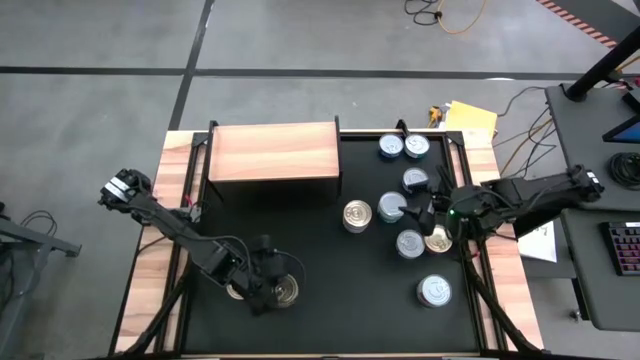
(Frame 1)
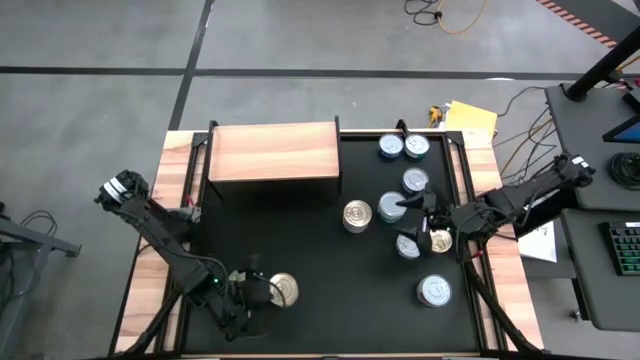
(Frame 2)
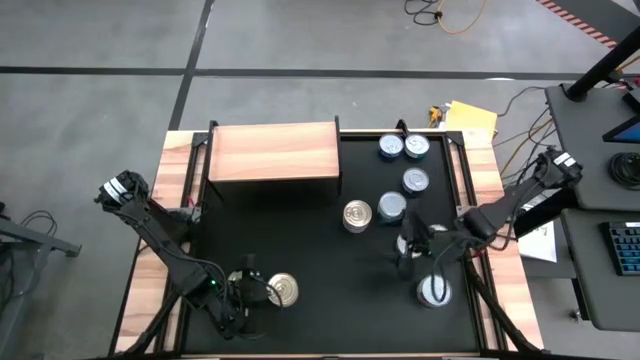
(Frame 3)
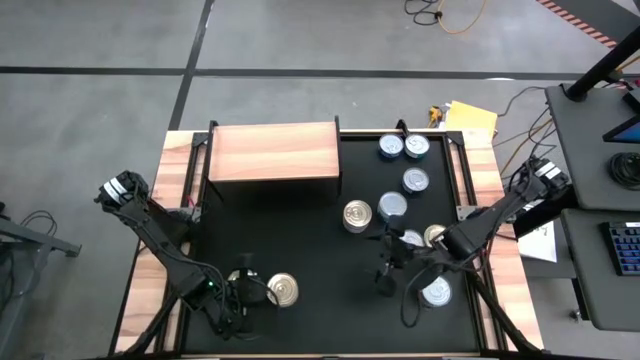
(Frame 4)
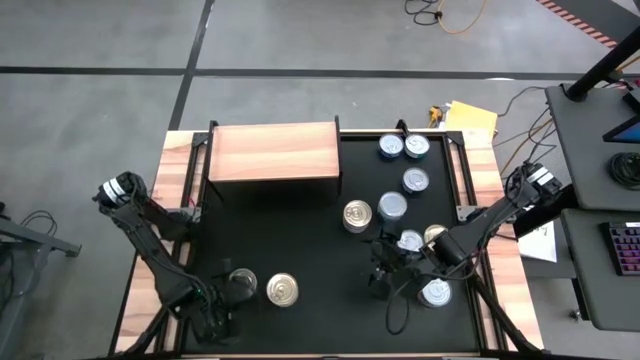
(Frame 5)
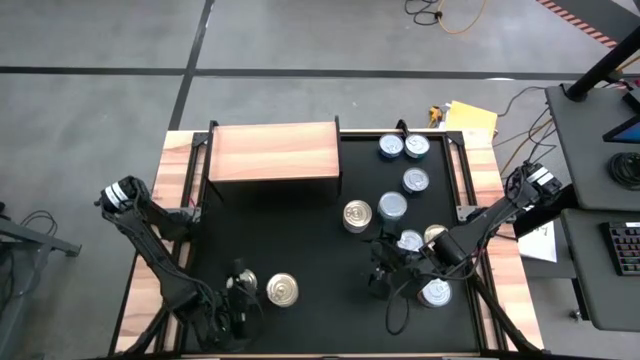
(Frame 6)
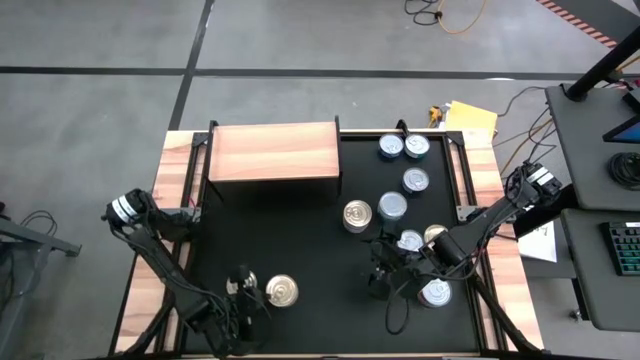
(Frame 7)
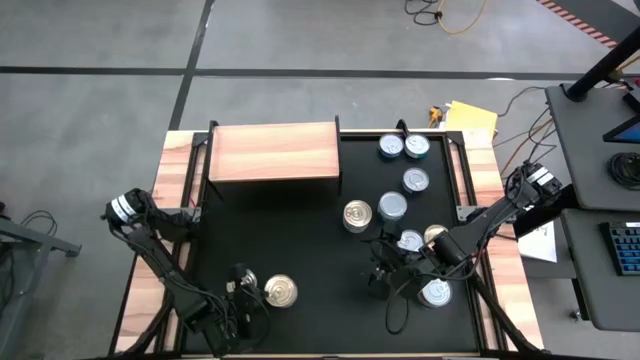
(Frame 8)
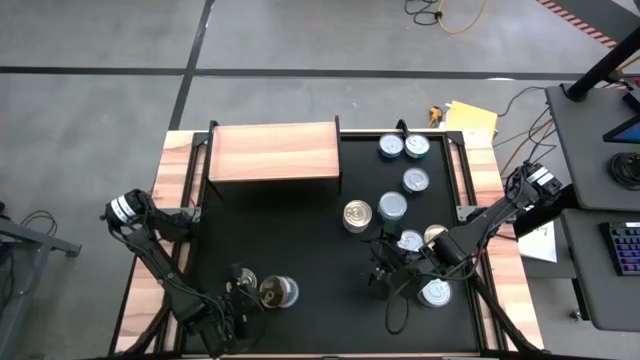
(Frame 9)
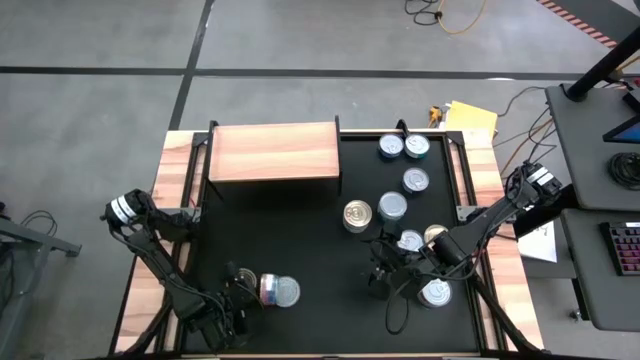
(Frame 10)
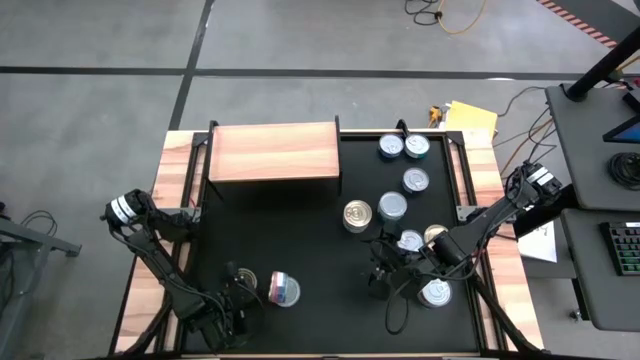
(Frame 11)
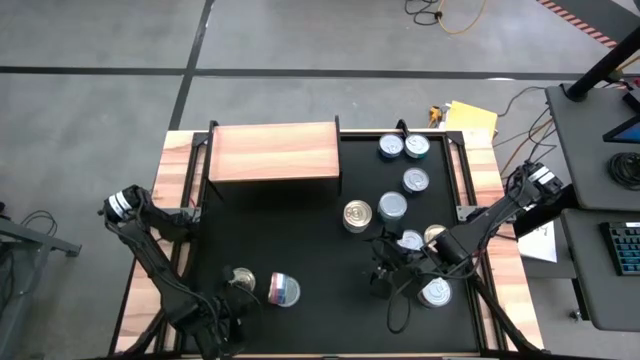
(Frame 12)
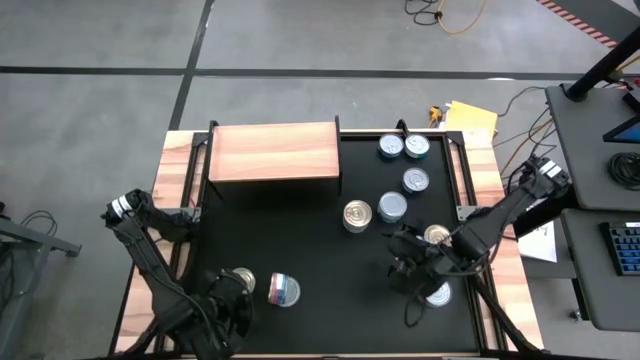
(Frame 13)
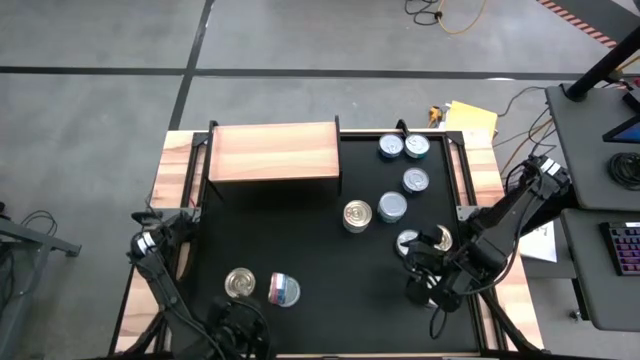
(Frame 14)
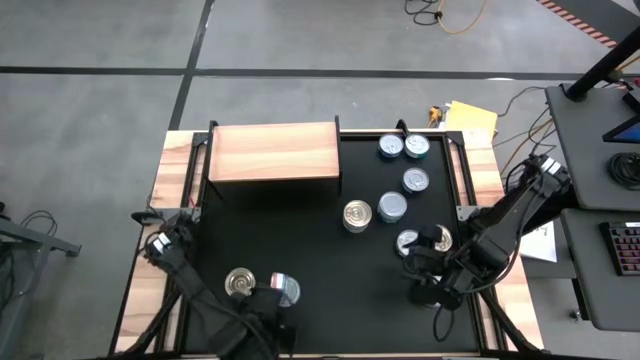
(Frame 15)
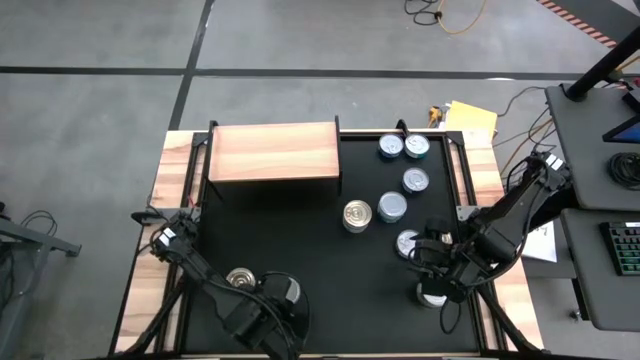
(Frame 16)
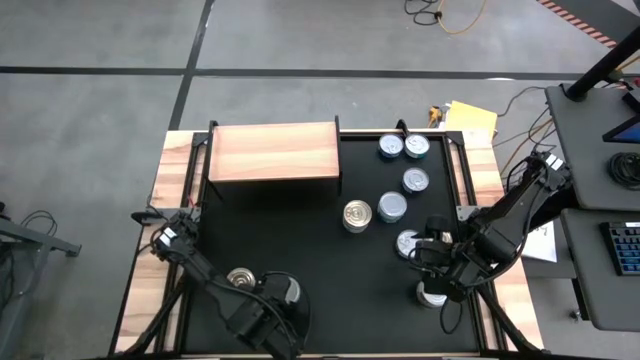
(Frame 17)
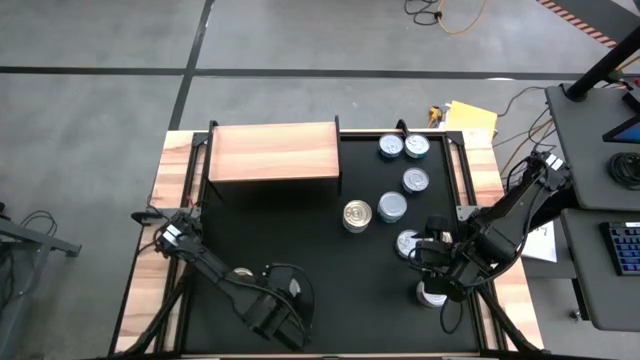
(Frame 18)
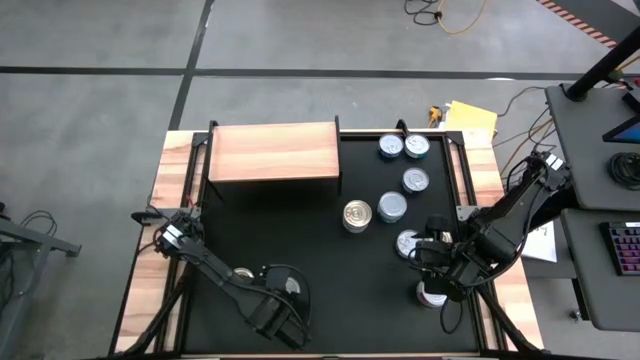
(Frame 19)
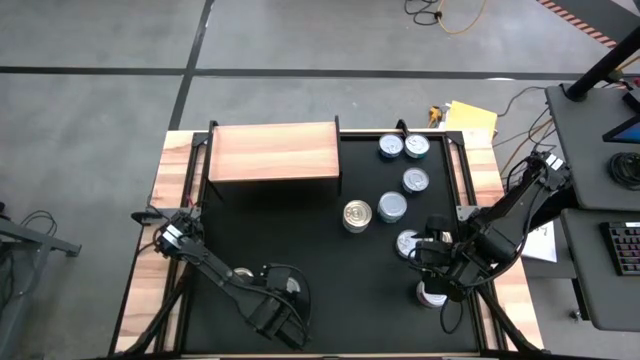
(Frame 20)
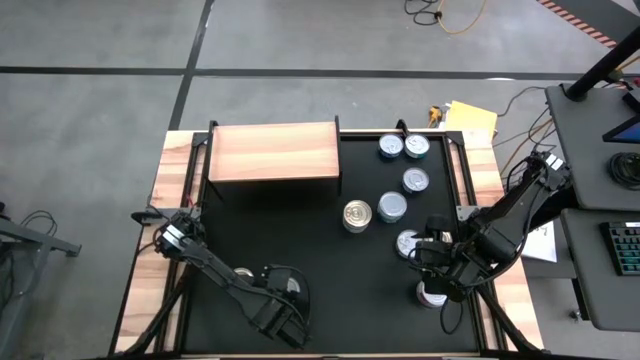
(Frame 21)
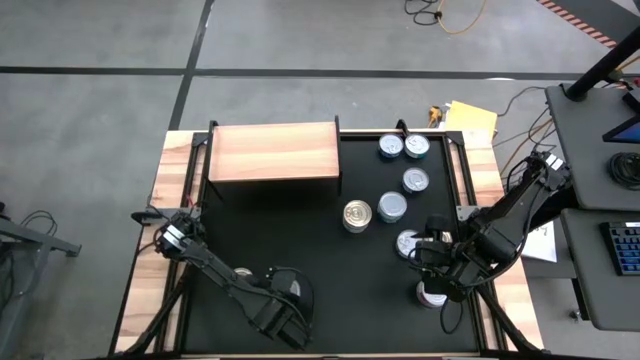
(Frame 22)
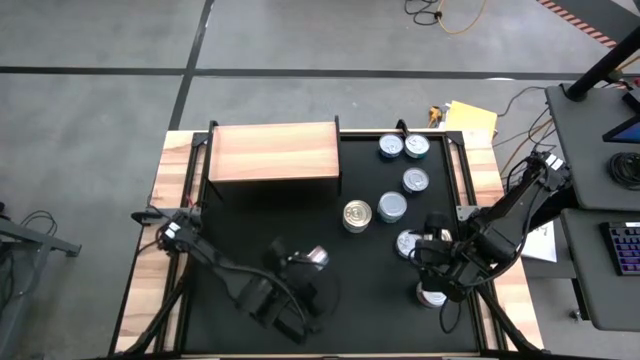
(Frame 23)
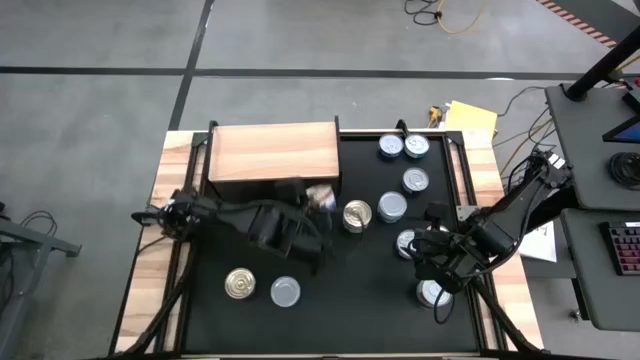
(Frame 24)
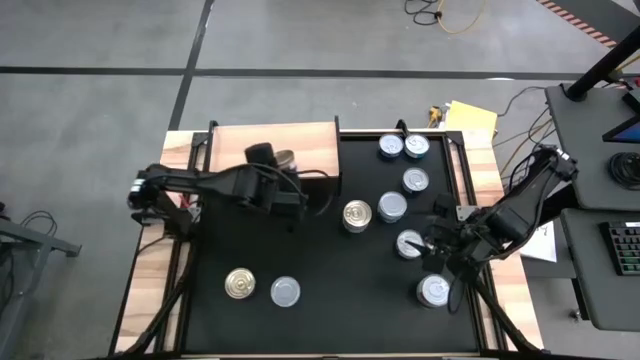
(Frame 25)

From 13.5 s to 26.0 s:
Task: Stack canned seafood by type on shelf
Put the blue/pink tuna can on the shelf

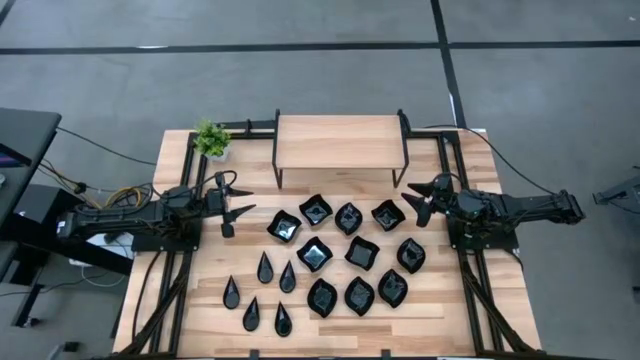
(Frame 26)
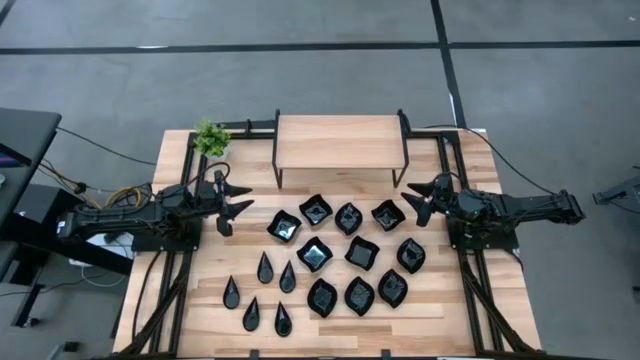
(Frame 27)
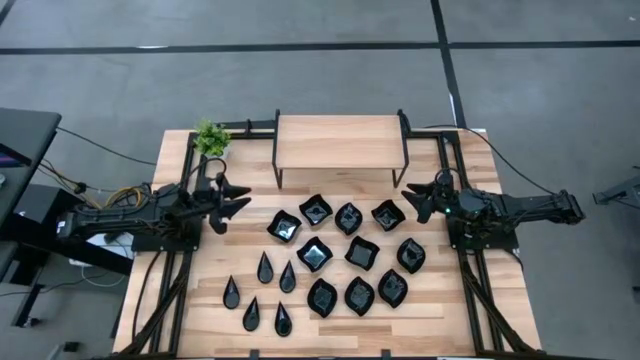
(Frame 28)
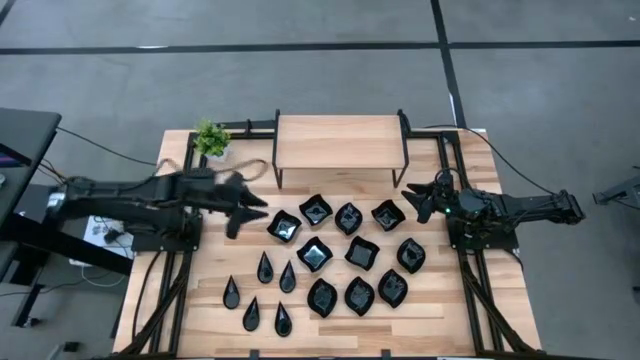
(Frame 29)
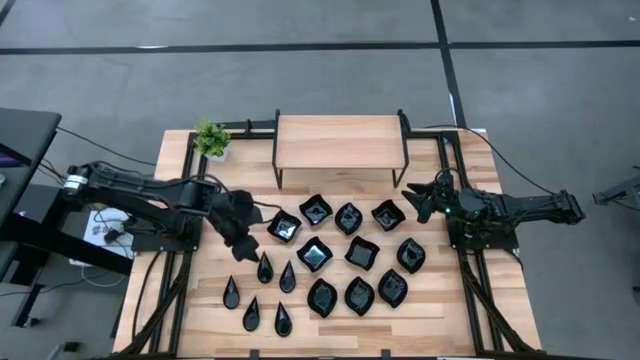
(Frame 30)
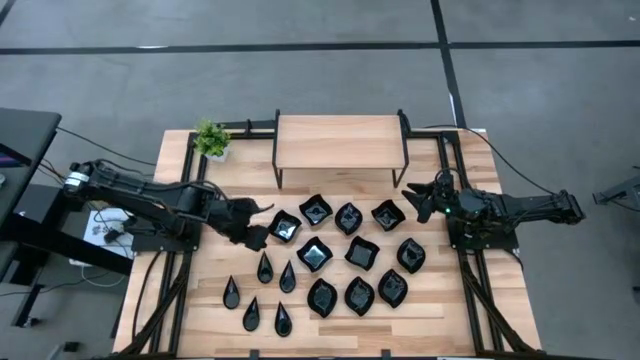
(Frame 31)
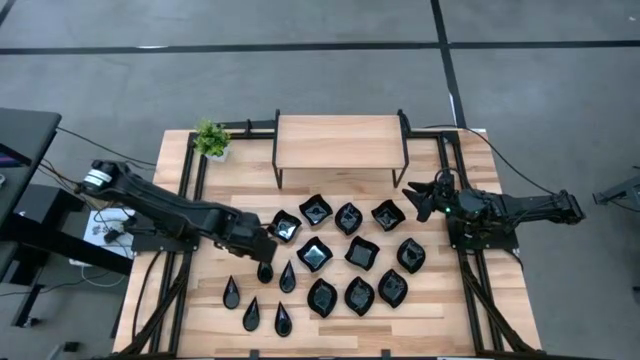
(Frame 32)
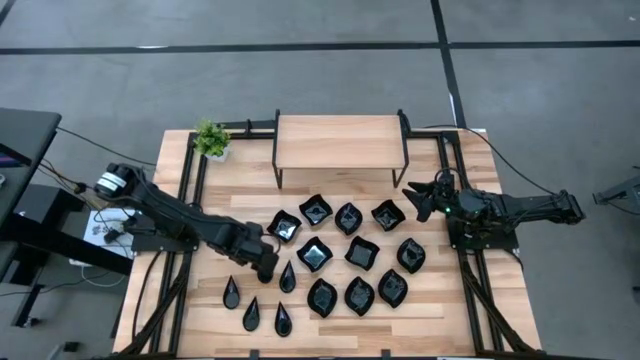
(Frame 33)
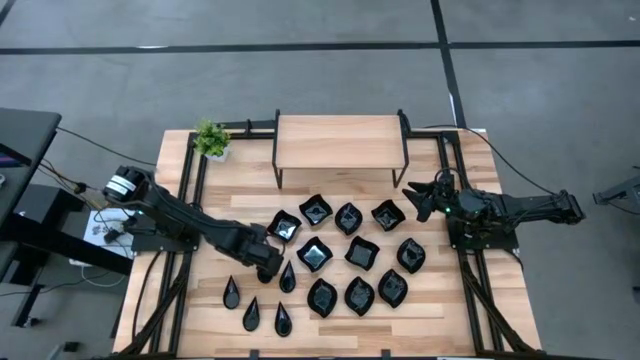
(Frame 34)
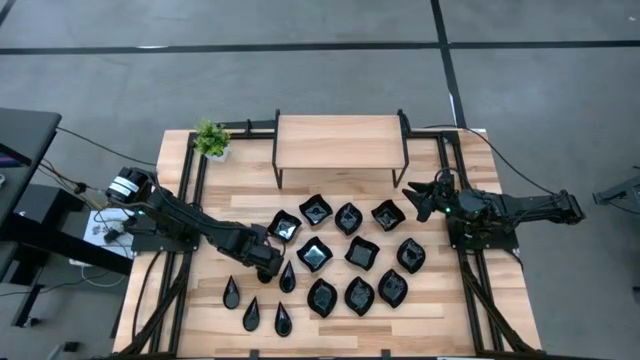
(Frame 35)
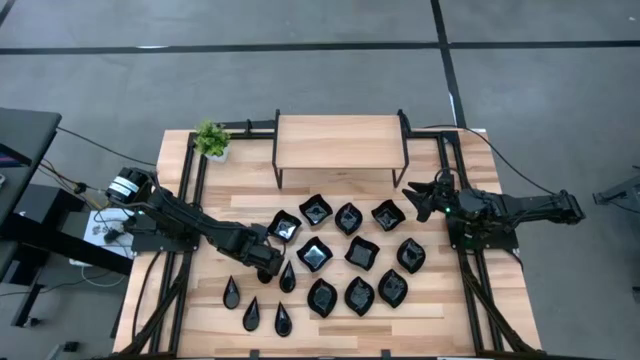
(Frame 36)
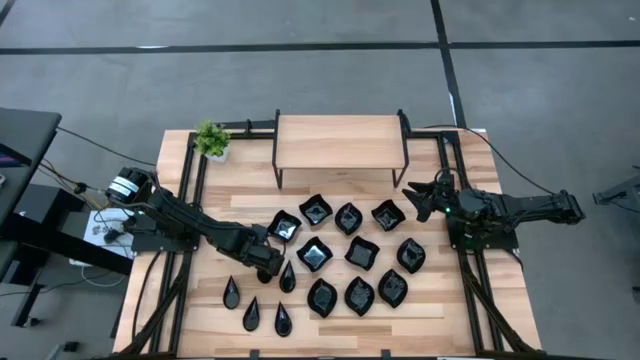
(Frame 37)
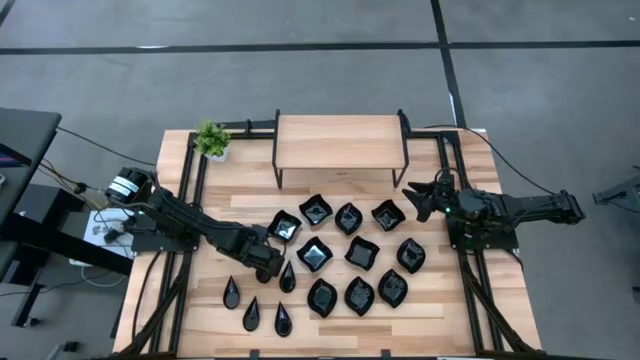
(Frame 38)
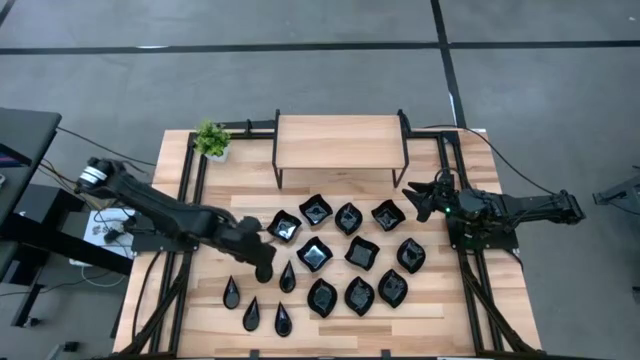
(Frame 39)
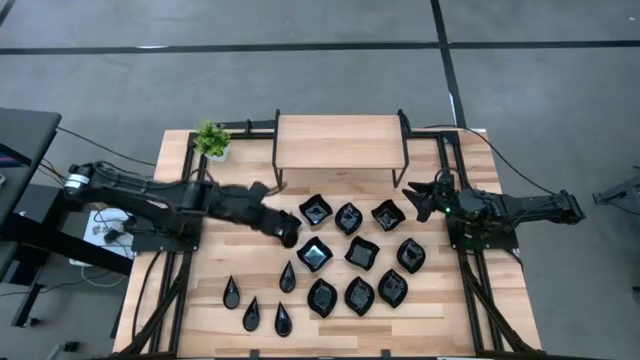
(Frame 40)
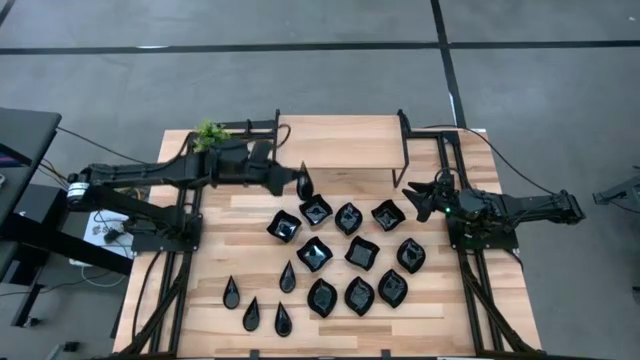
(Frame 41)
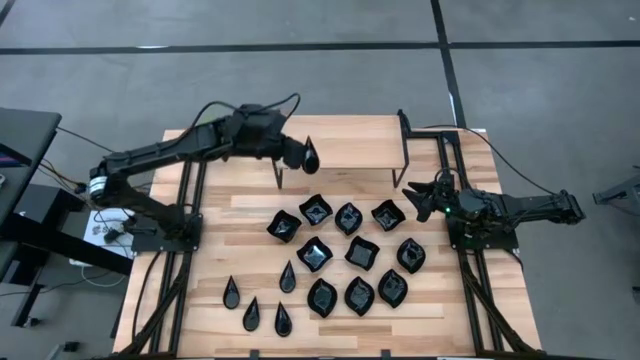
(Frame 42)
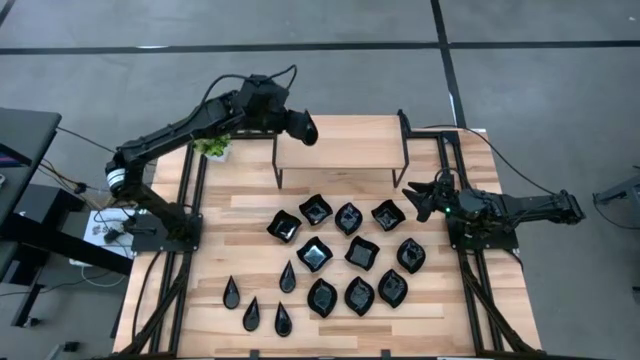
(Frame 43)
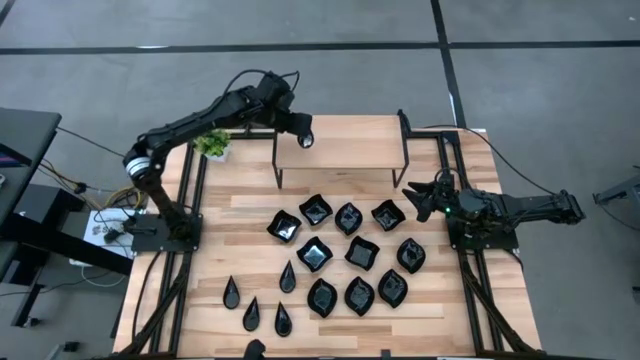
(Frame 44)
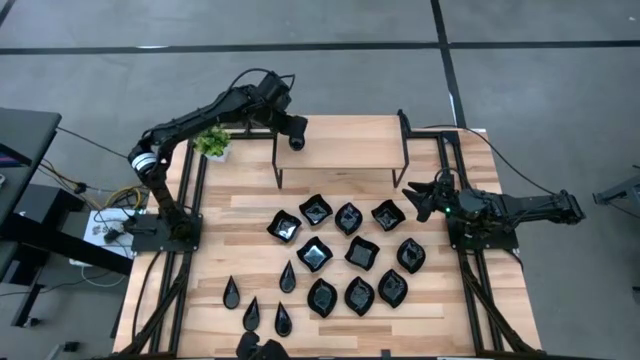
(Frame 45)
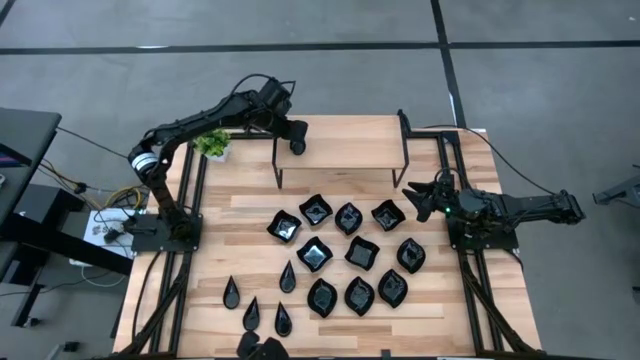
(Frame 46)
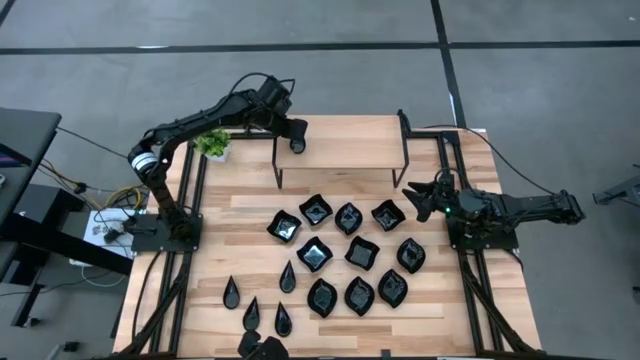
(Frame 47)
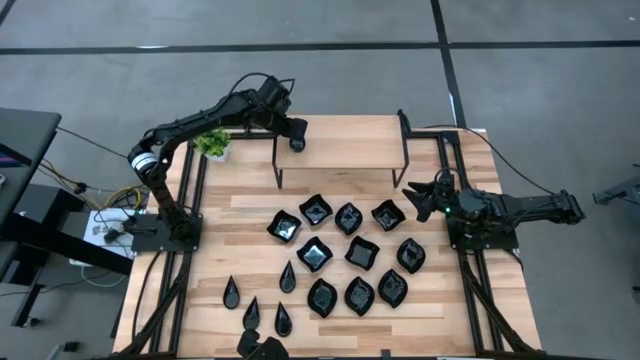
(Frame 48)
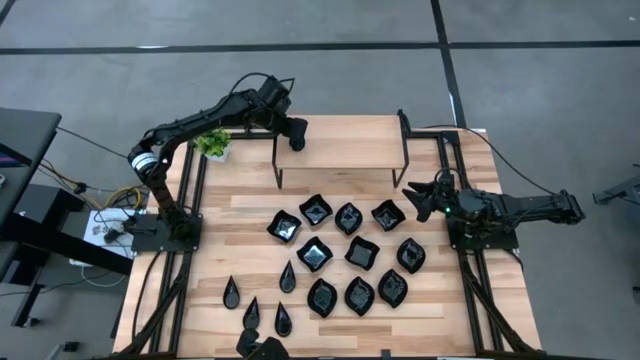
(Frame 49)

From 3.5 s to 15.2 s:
Task: Pick & Place Mini shaped plates
Put the drop shaped plate on the shelf
